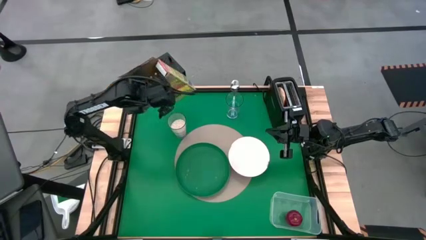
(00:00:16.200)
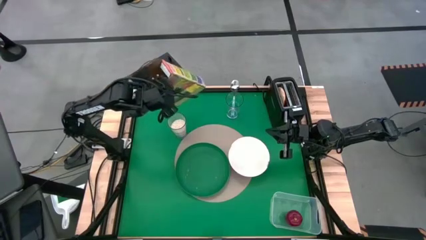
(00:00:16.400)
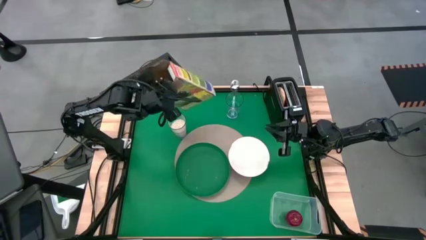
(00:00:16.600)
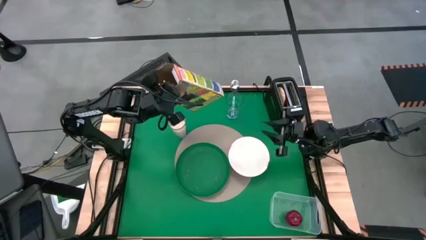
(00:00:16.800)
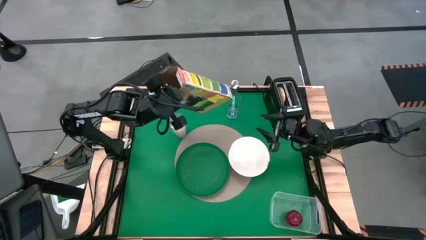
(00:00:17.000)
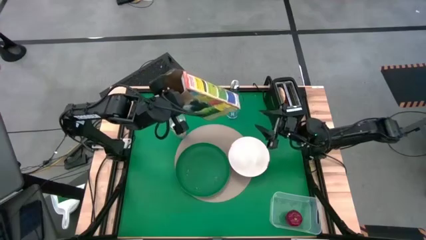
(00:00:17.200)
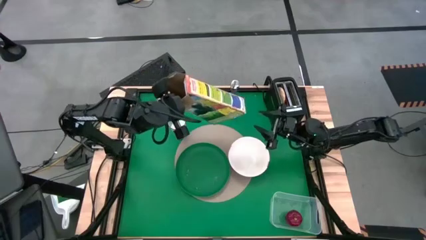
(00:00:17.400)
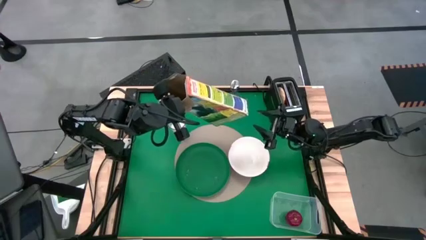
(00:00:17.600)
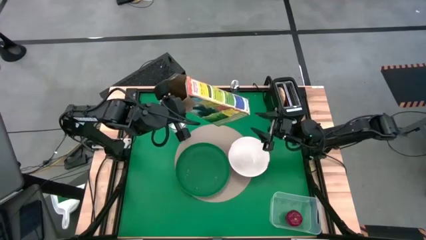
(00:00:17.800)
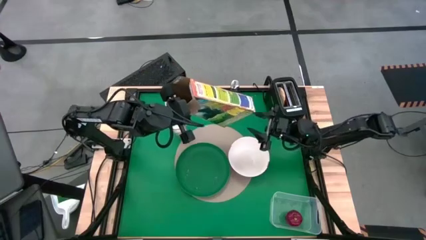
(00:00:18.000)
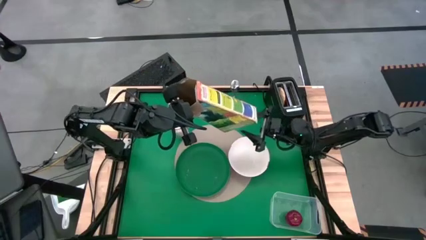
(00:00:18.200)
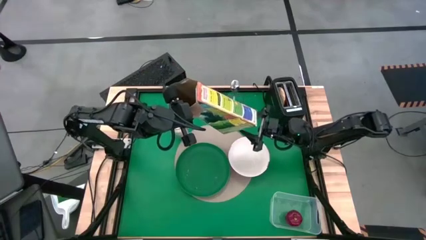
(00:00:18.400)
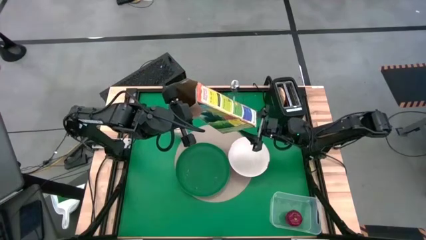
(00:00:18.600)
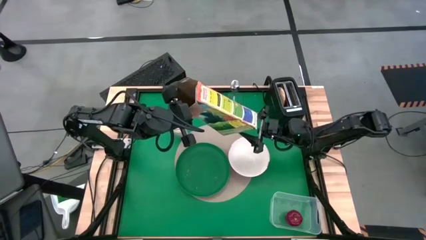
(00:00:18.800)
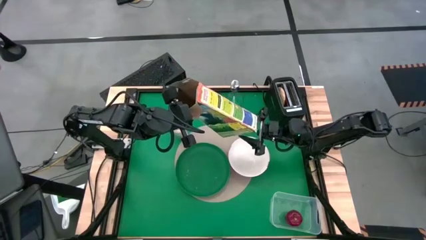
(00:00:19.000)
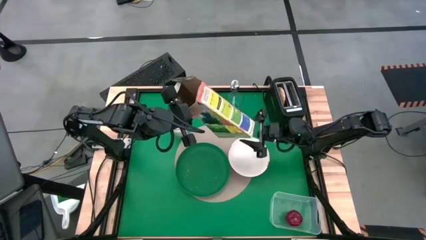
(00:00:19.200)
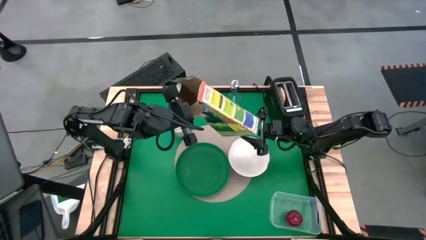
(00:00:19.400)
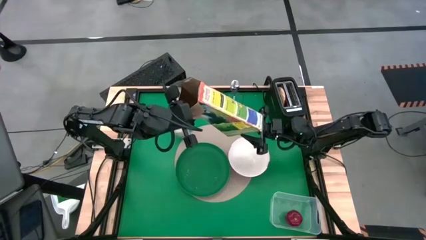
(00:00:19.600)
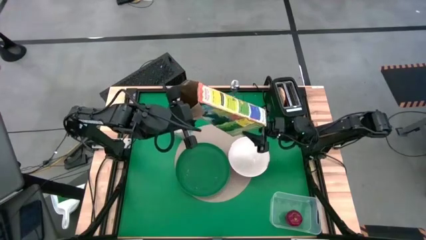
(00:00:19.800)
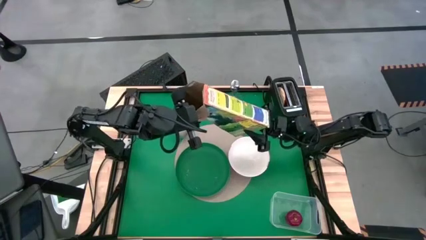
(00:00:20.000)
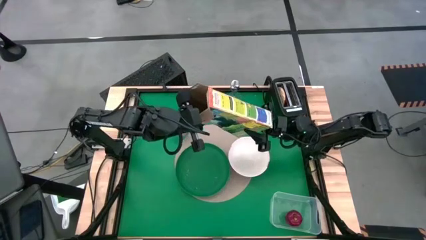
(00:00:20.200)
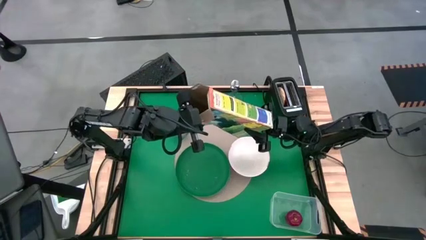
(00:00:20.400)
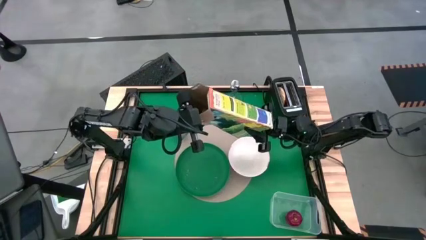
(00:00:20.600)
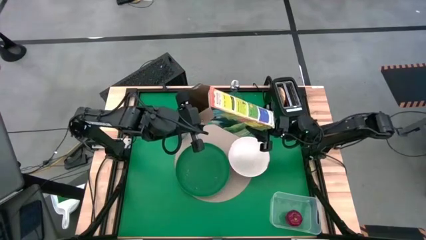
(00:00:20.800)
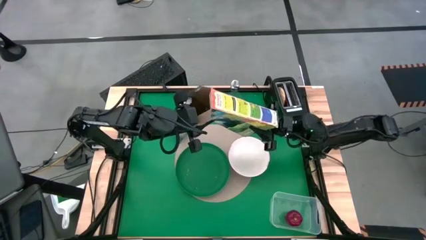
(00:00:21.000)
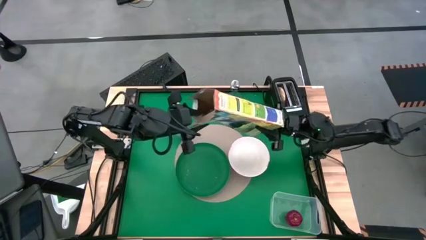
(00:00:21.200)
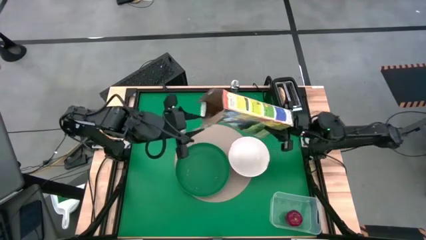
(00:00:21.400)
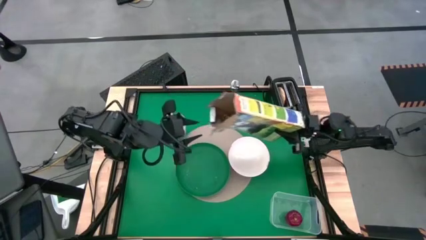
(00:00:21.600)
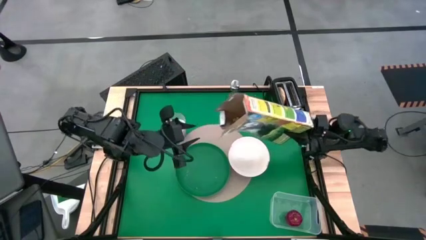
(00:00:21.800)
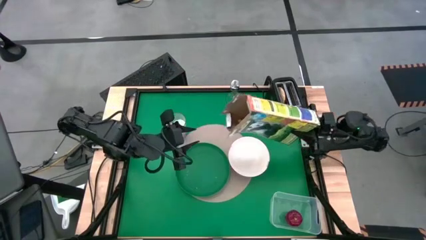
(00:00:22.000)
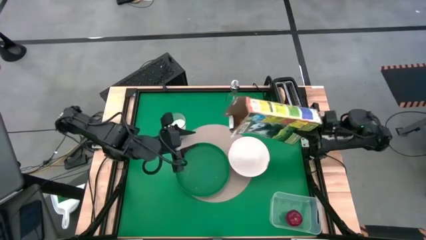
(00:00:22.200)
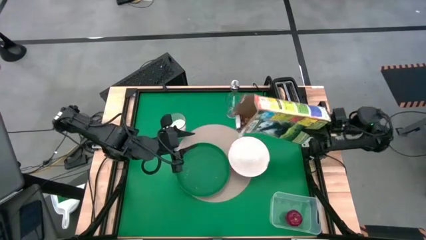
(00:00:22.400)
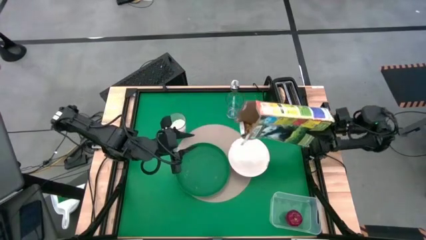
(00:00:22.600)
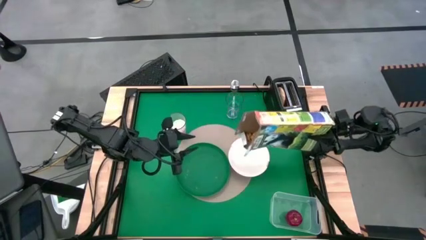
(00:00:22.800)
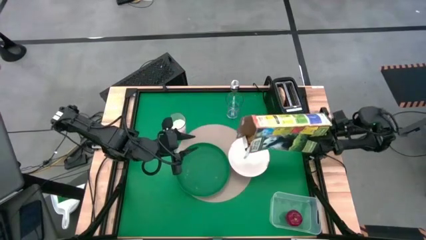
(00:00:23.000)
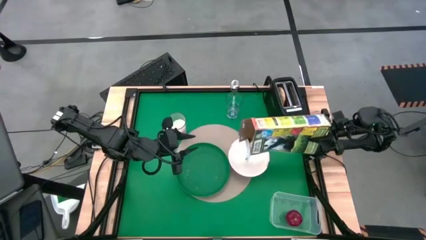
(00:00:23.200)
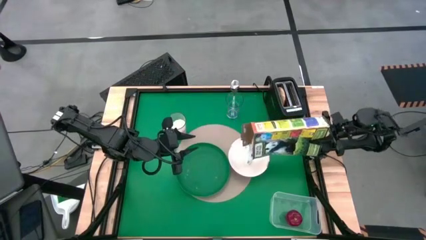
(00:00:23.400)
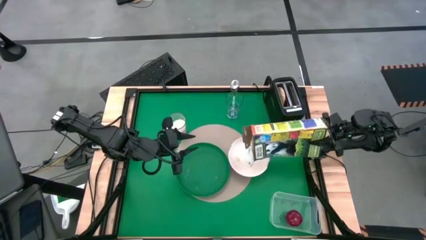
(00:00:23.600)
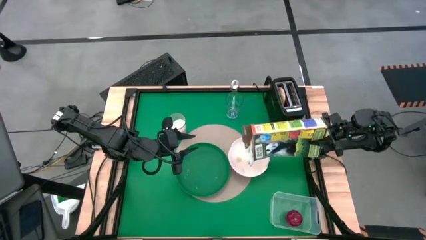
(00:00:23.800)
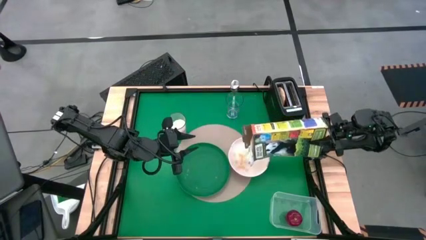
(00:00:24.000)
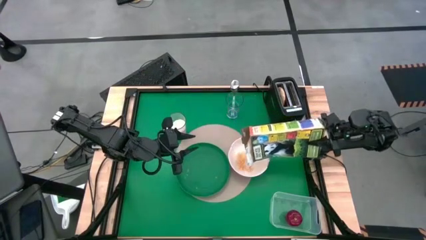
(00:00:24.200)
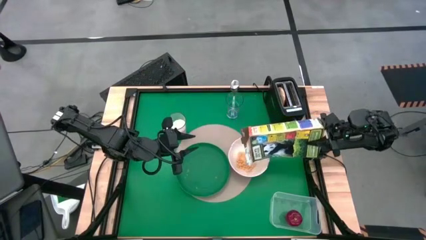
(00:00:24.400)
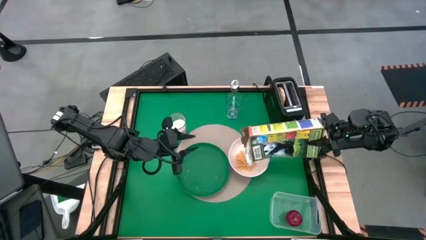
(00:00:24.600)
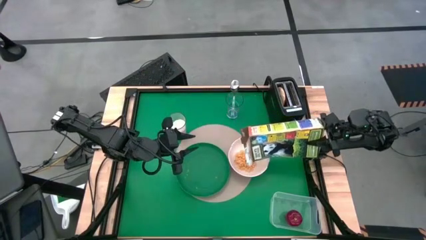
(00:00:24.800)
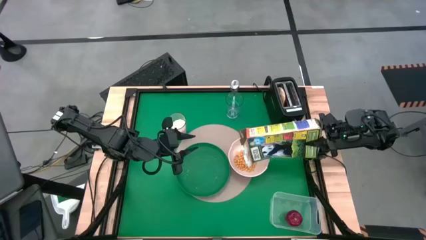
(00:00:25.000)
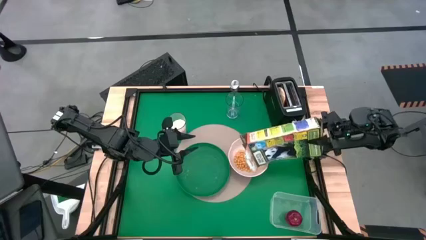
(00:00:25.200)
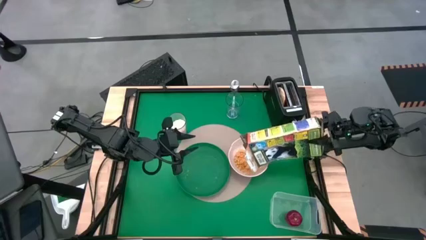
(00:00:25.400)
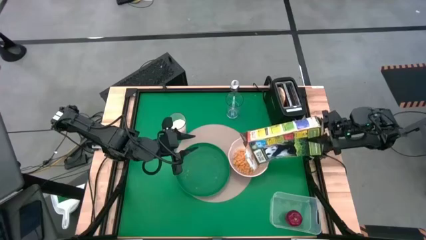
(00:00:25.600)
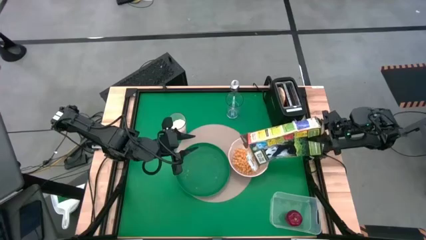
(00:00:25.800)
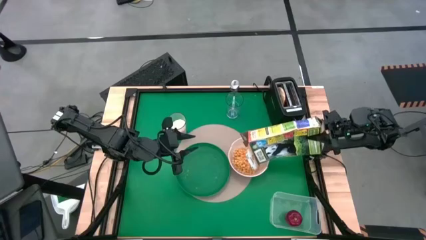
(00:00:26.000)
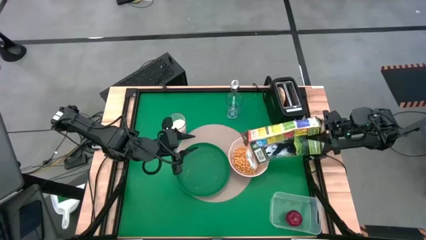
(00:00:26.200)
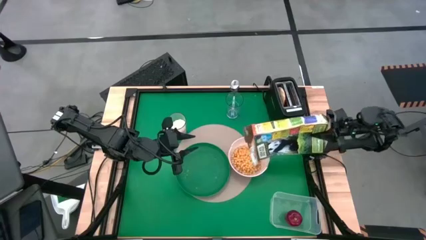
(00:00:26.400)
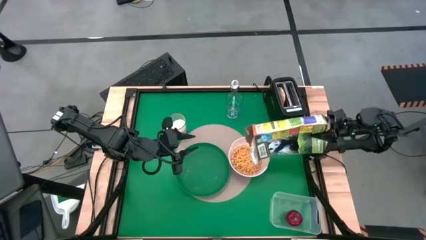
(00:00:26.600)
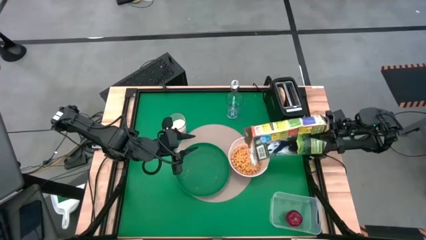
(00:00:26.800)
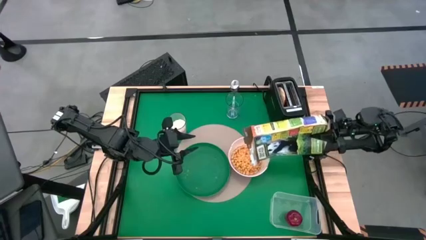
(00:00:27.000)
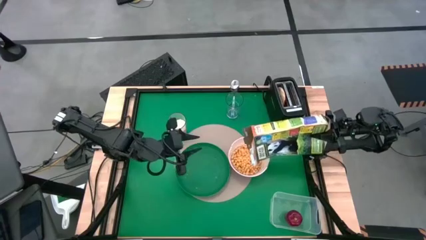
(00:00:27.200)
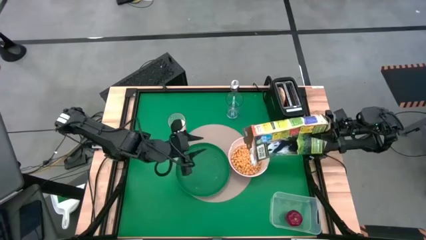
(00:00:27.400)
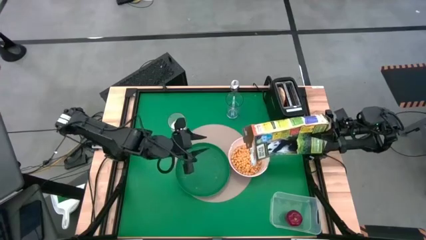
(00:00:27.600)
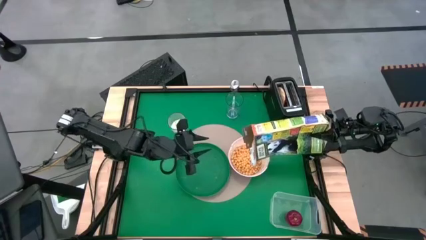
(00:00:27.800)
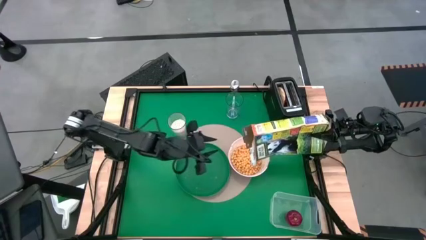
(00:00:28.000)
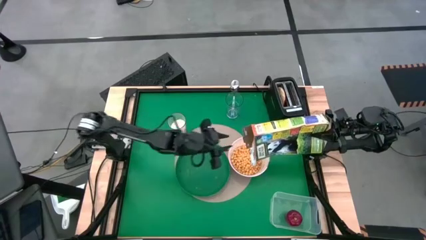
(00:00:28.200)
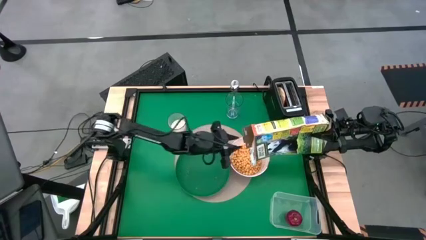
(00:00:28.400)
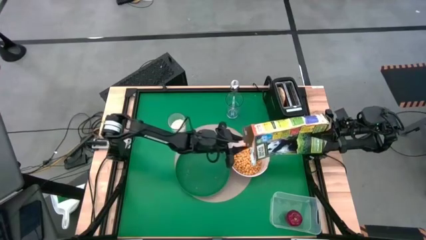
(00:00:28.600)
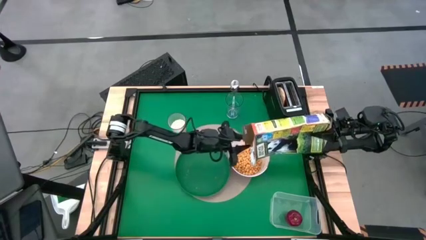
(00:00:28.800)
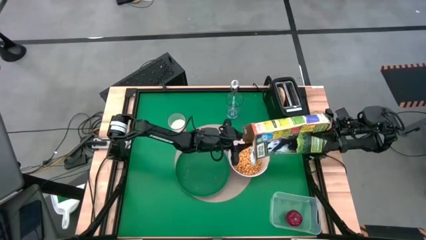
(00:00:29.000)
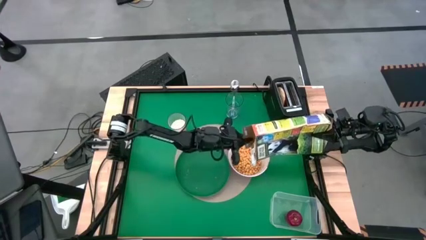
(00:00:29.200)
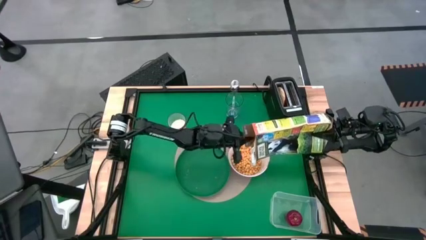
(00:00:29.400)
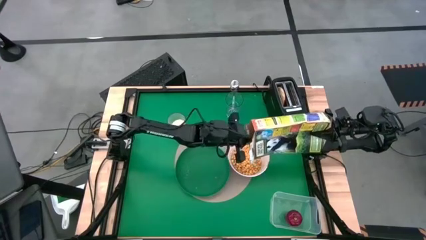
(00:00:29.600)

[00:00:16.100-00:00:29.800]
Task: Arrange a breakfast setting
Pour the cereal into the white bowl
